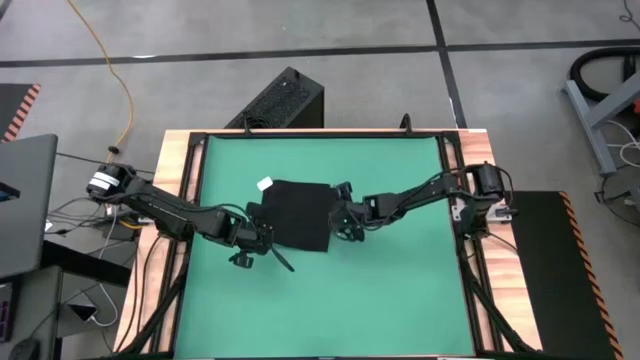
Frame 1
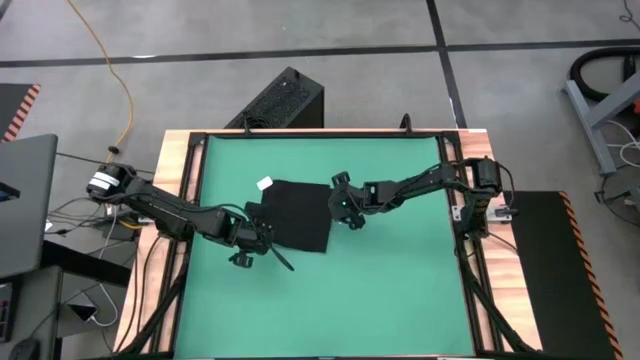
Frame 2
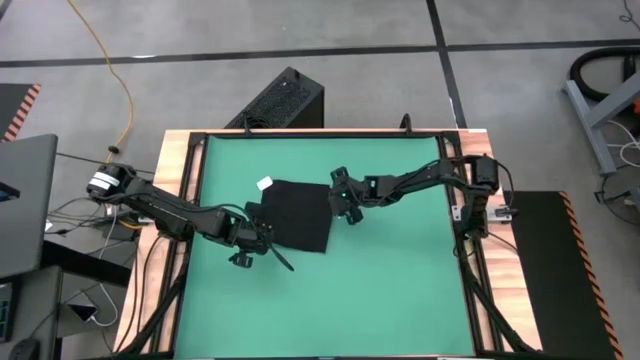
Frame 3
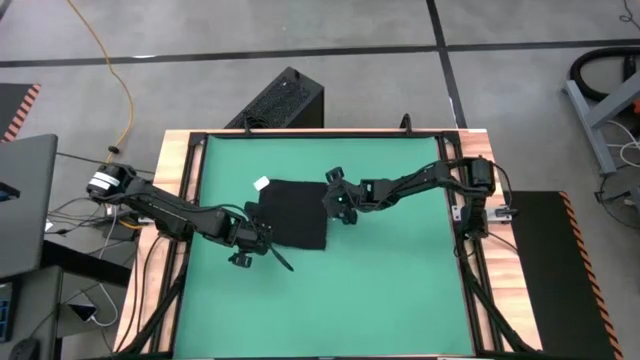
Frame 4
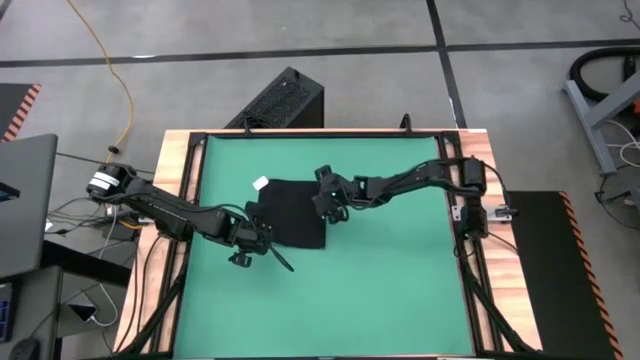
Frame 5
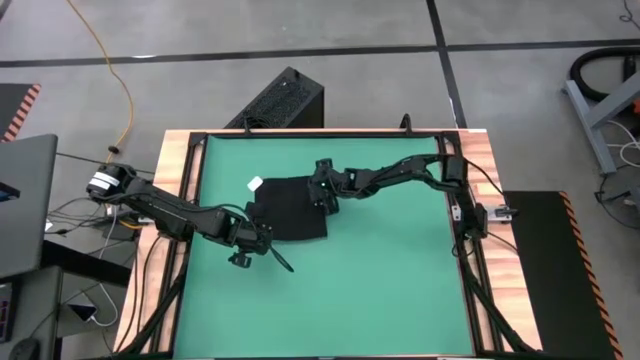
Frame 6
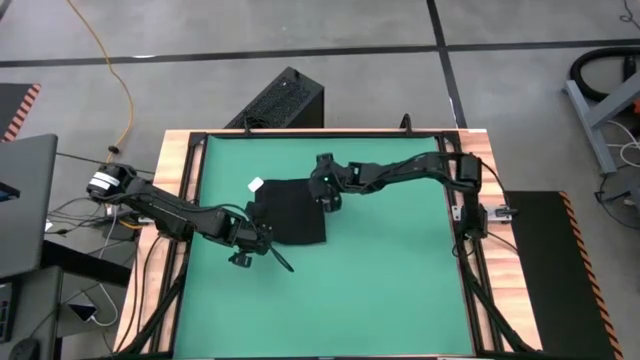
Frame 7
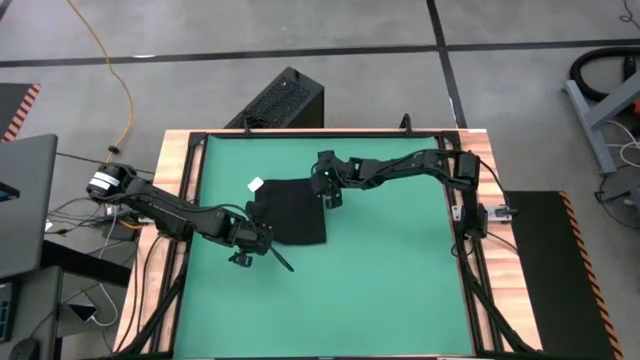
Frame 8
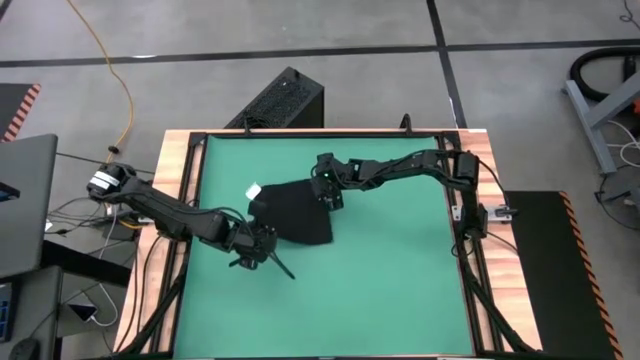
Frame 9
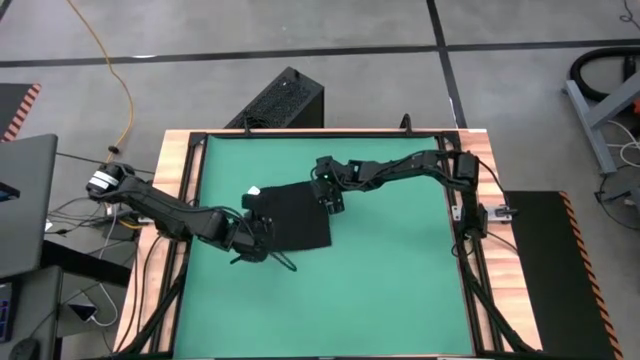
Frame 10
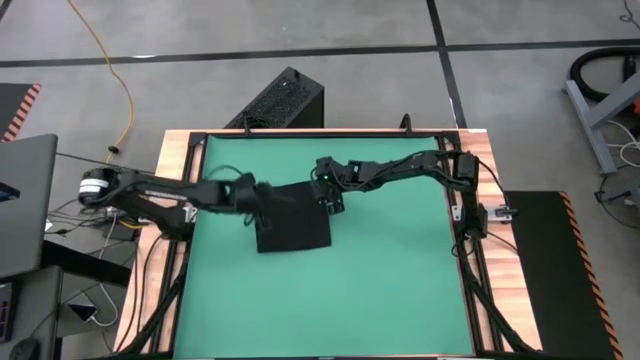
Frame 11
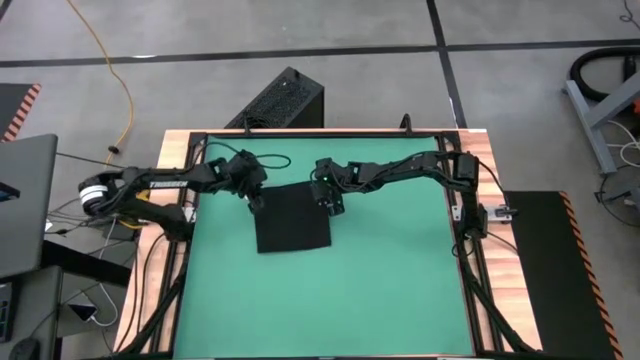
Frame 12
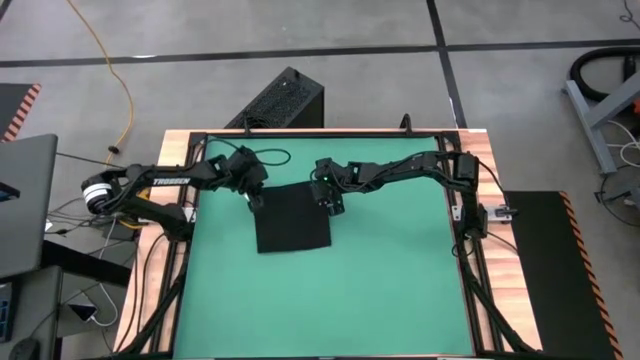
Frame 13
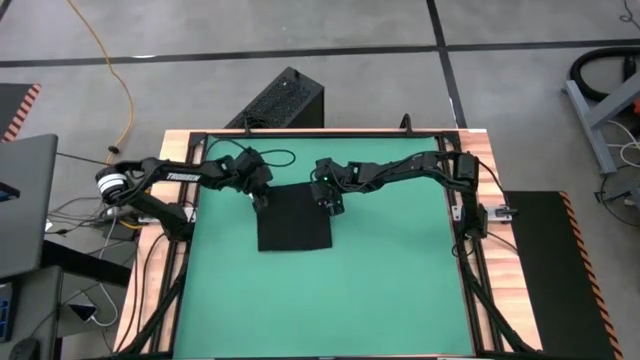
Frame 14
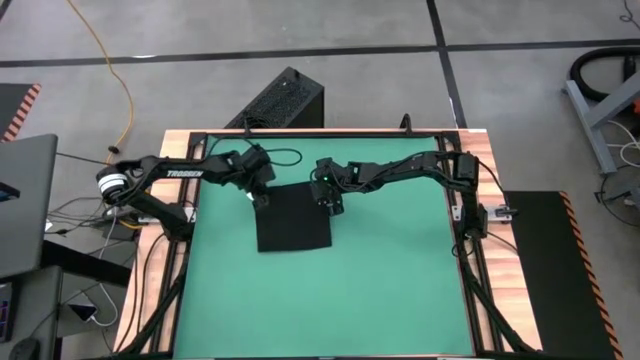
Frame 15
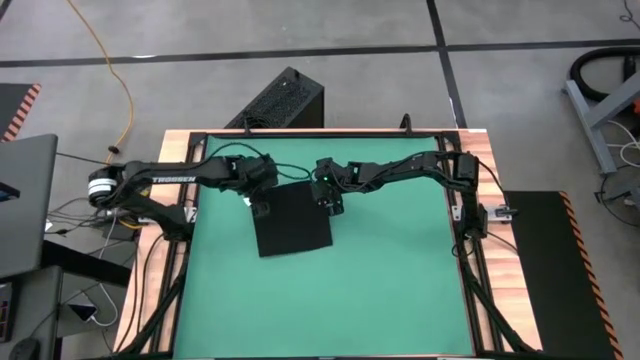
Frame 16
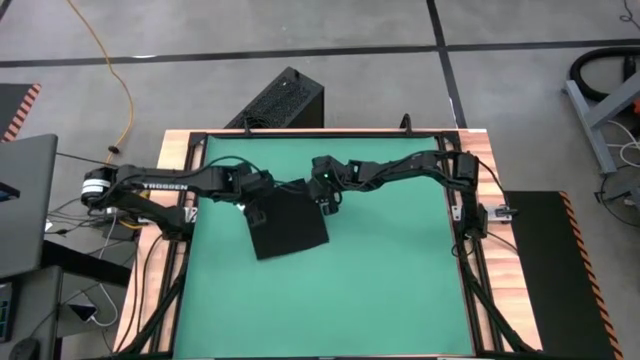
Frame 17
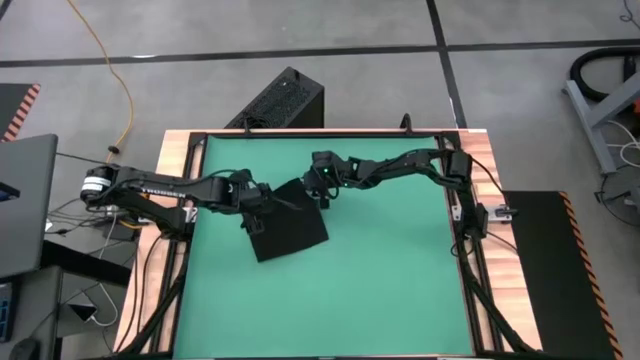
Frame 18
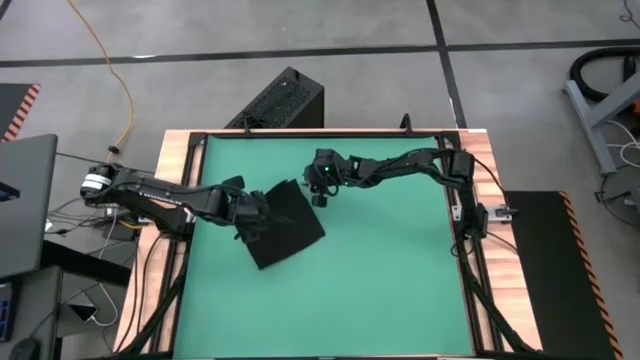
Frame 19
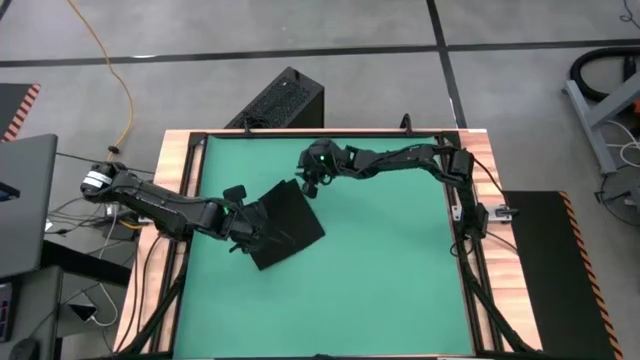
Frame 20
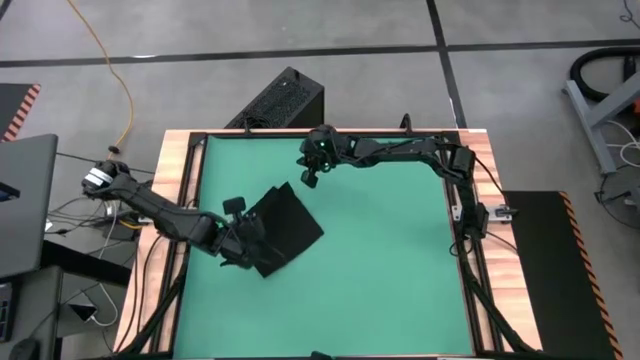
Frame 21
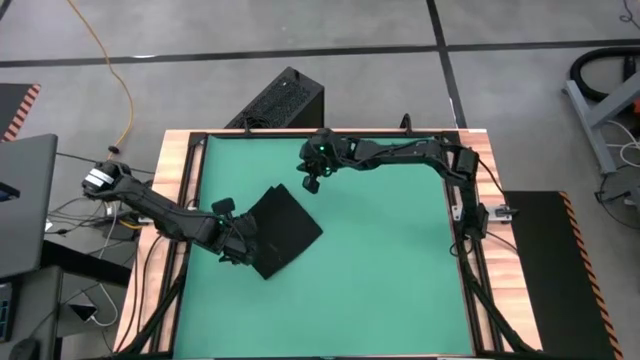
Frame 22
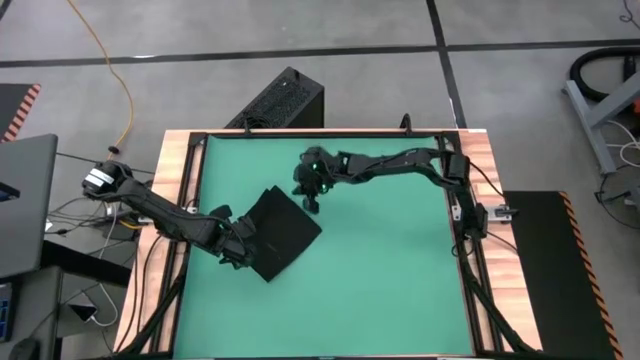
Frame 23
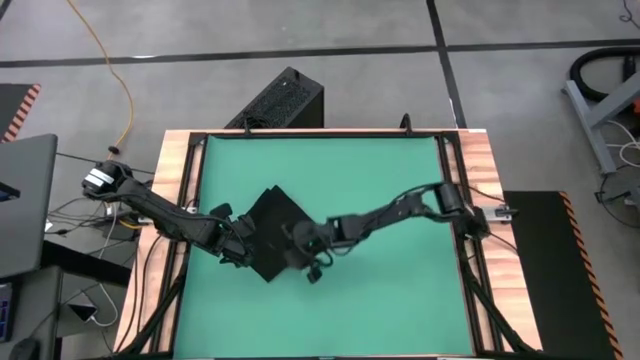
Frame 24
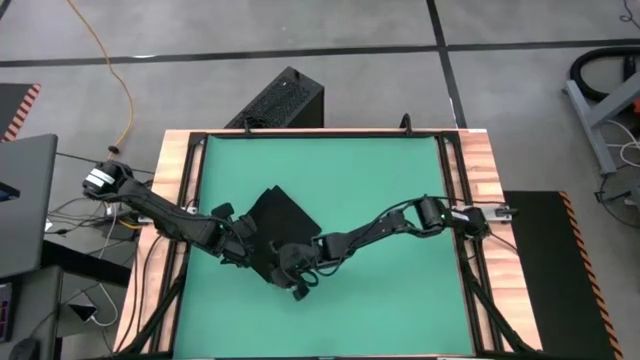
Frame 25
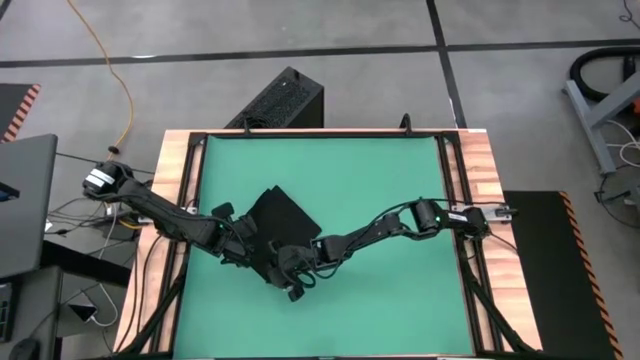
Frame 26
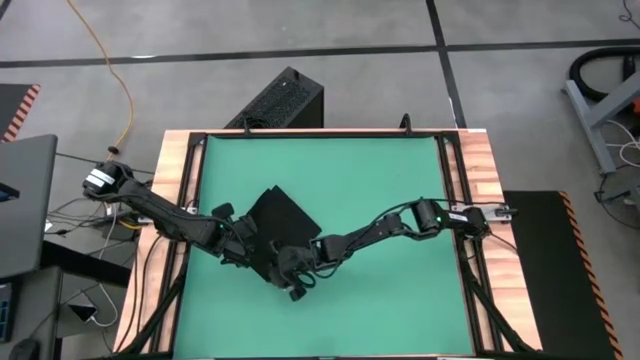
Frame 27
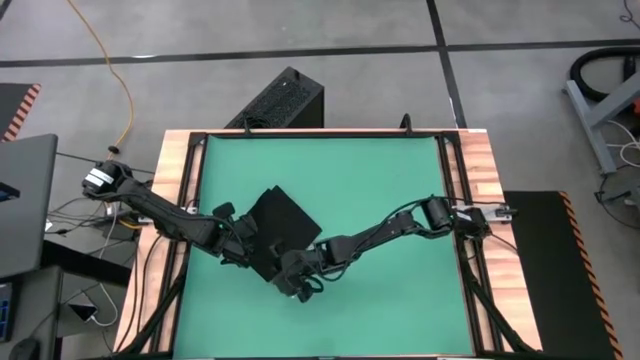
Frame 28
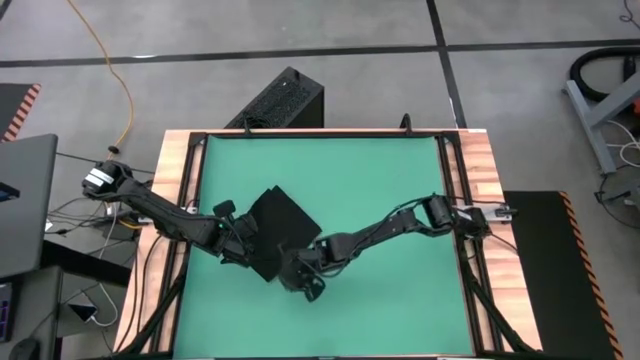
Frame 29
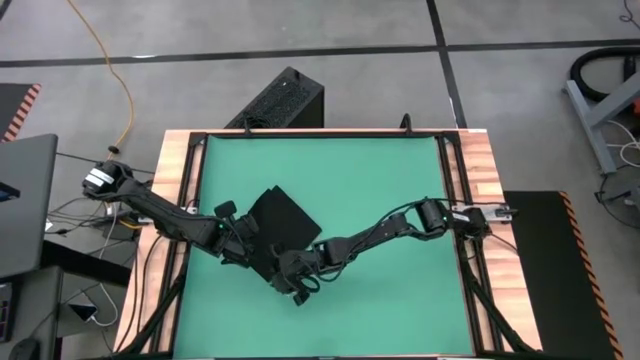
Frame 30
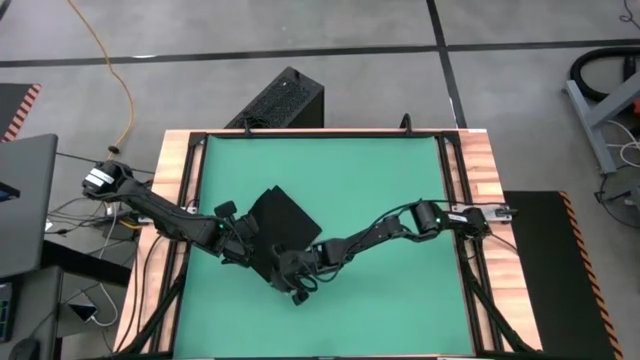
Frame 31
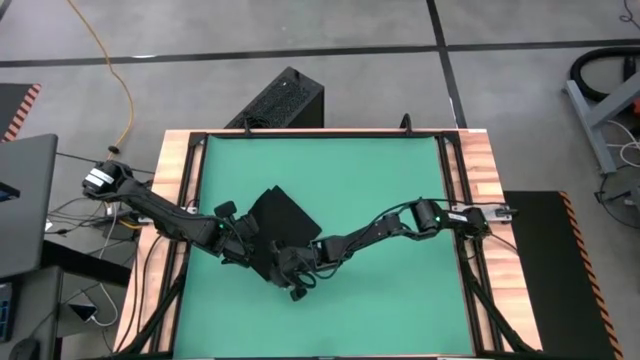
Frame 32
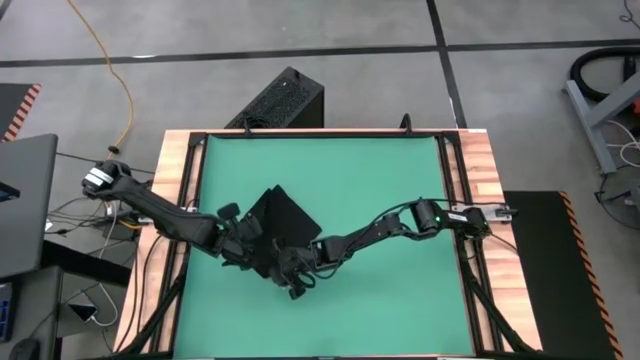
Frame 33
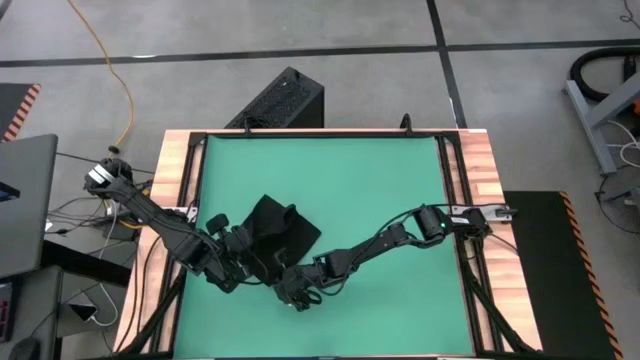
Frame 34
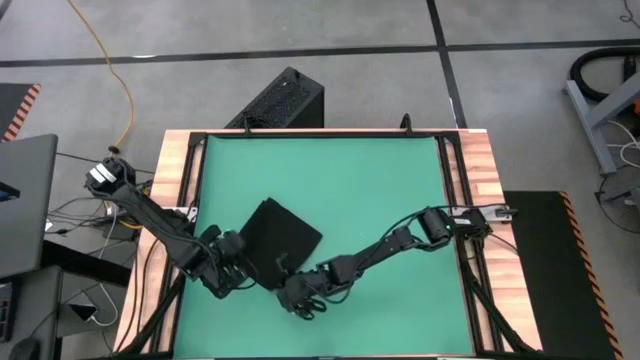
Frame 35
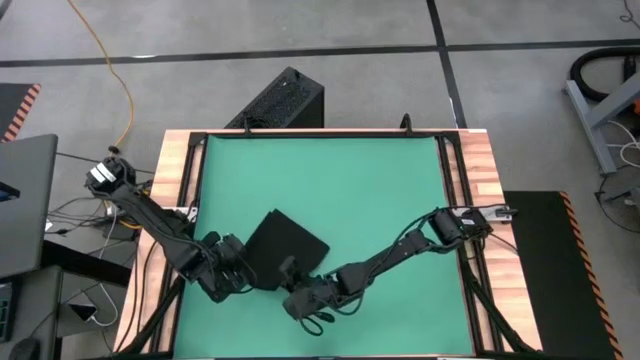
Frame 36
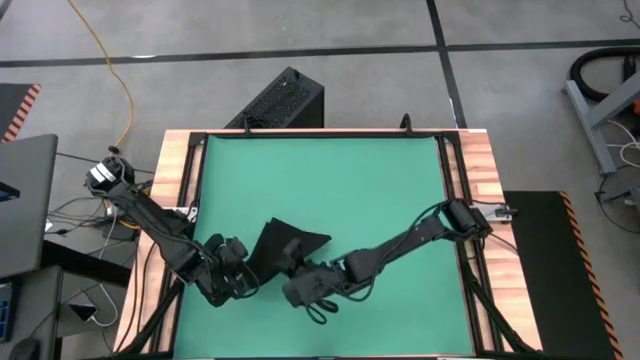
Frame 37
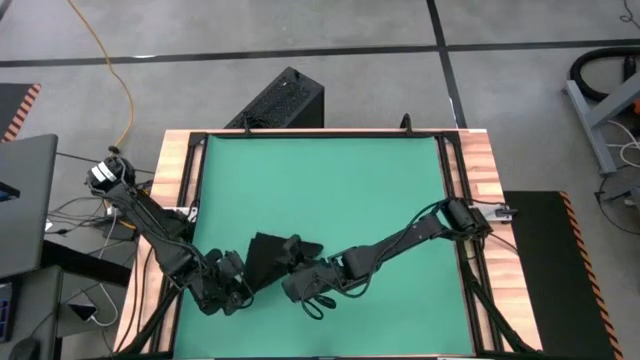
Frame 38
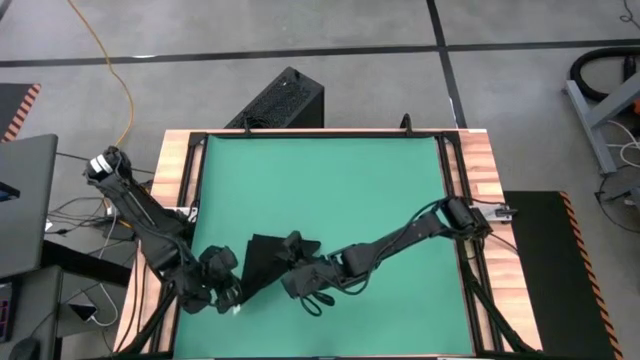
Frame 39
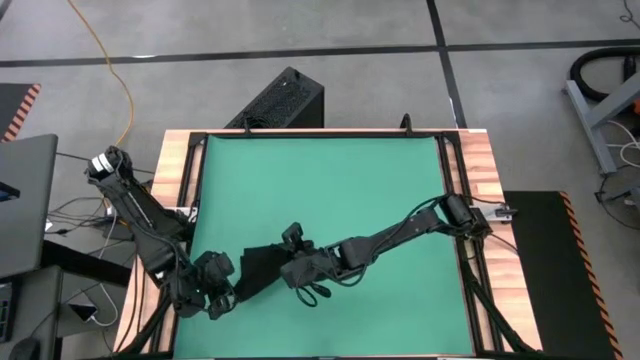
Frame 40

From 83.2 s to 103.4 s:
Task: Roll towel
Roll the black towel
